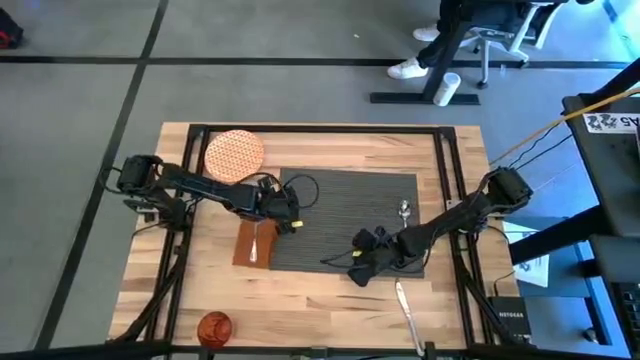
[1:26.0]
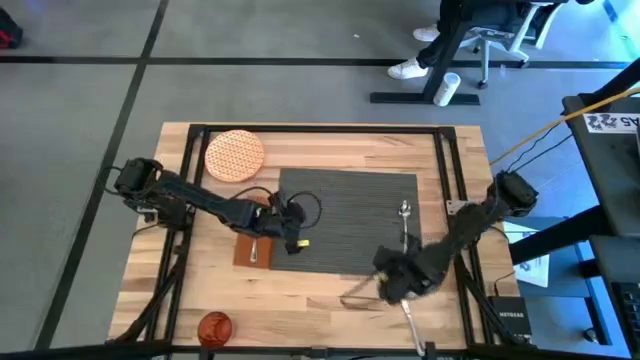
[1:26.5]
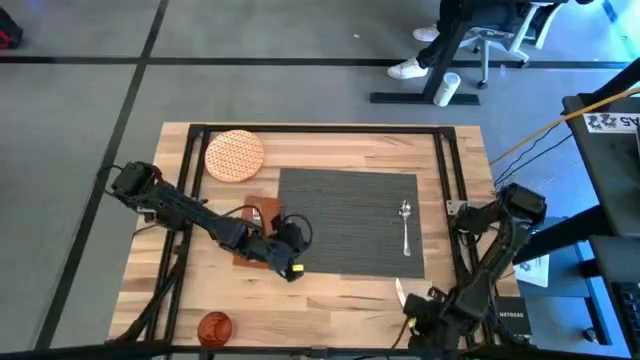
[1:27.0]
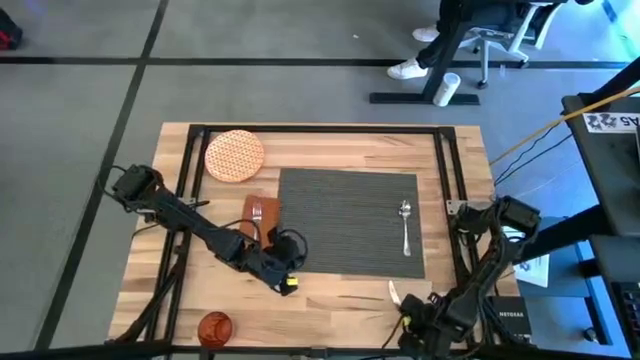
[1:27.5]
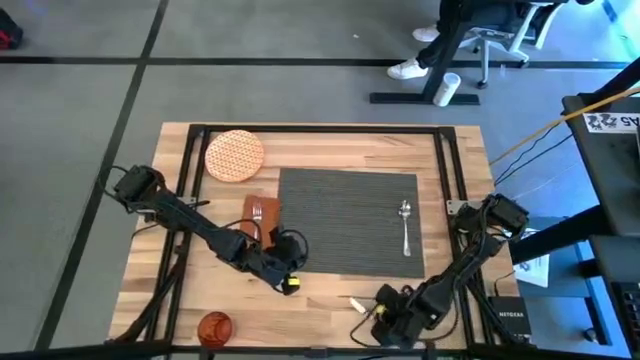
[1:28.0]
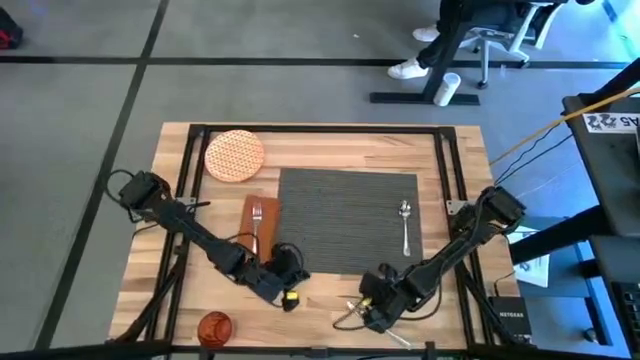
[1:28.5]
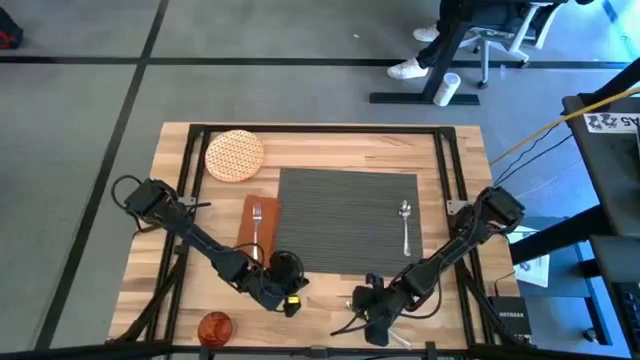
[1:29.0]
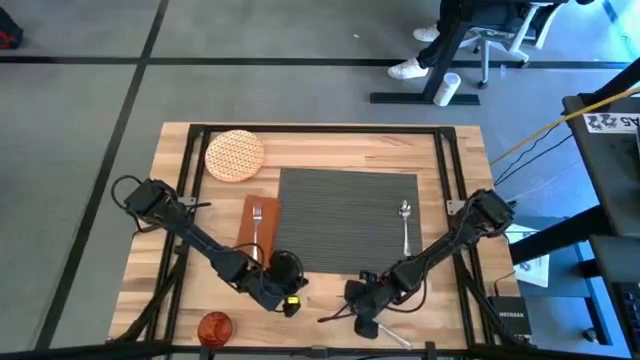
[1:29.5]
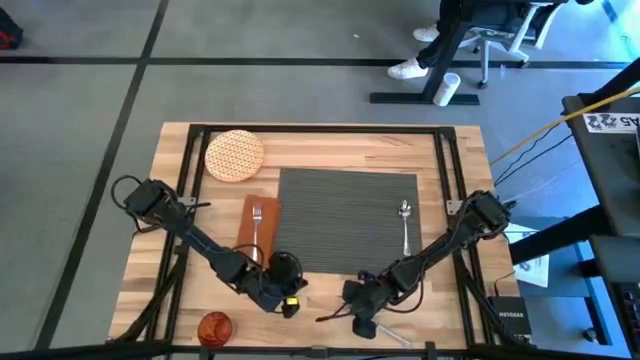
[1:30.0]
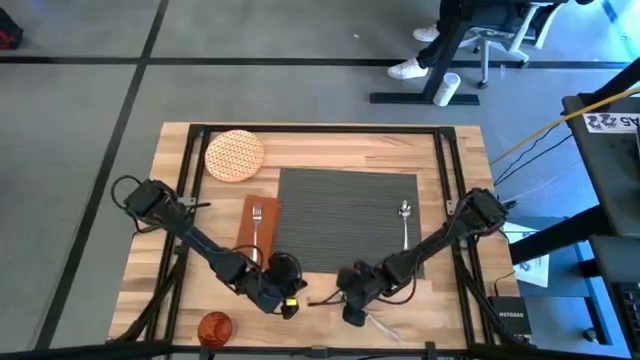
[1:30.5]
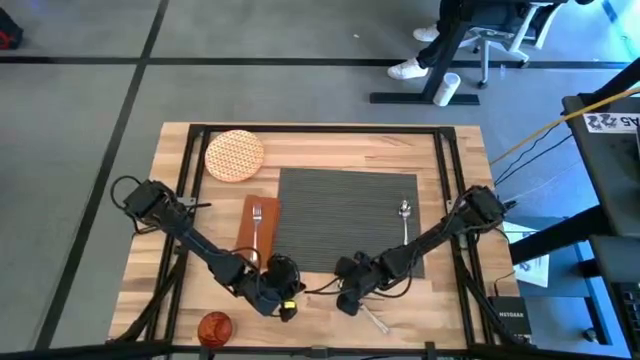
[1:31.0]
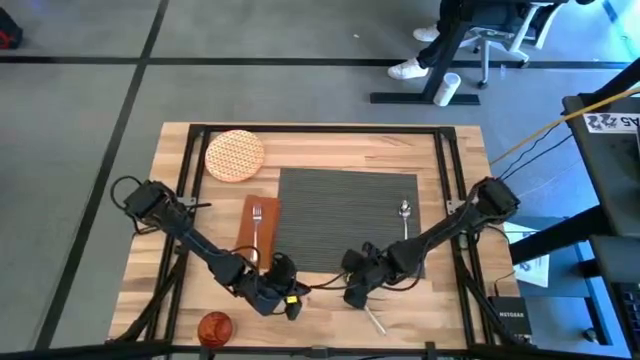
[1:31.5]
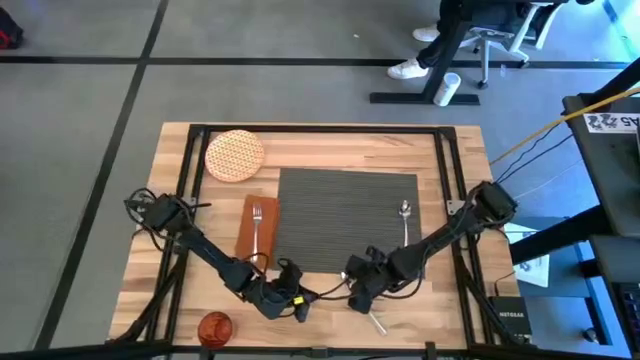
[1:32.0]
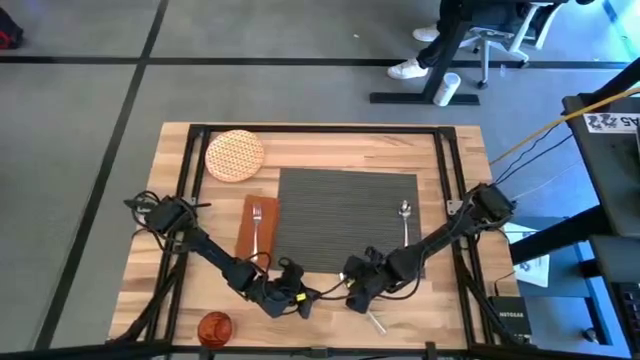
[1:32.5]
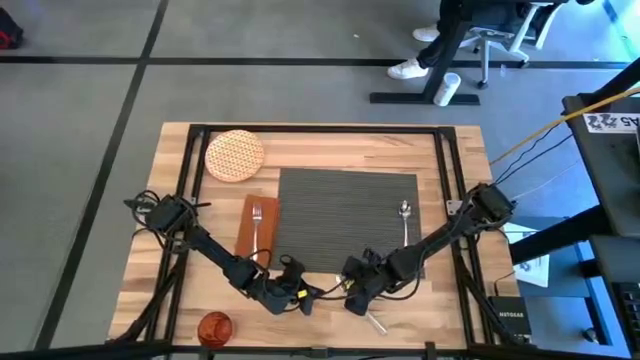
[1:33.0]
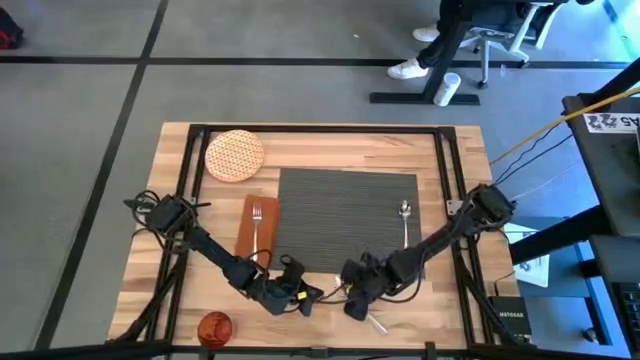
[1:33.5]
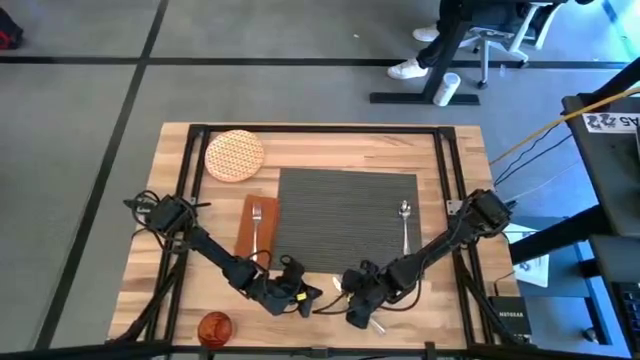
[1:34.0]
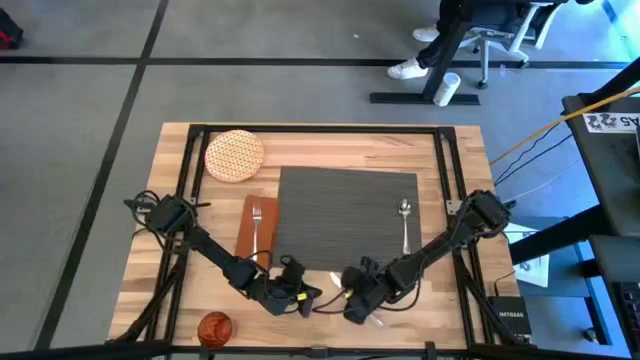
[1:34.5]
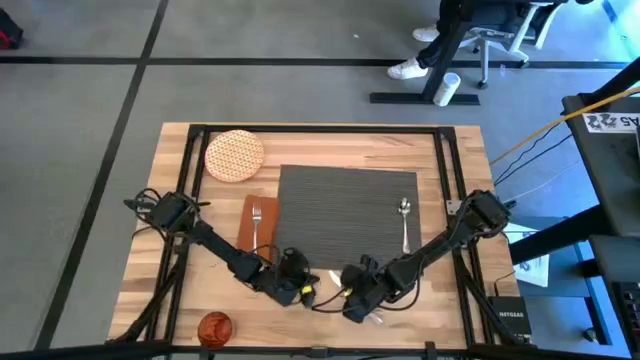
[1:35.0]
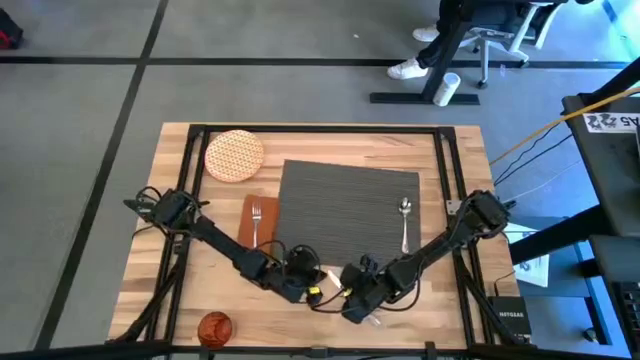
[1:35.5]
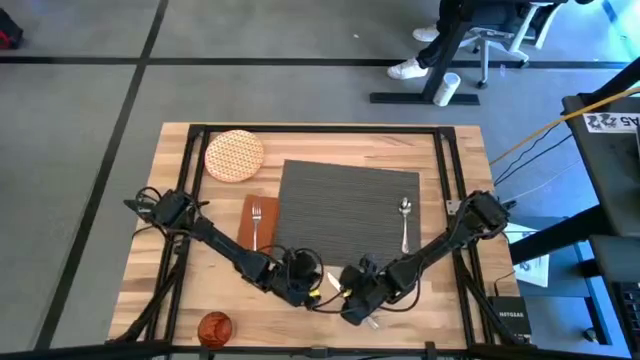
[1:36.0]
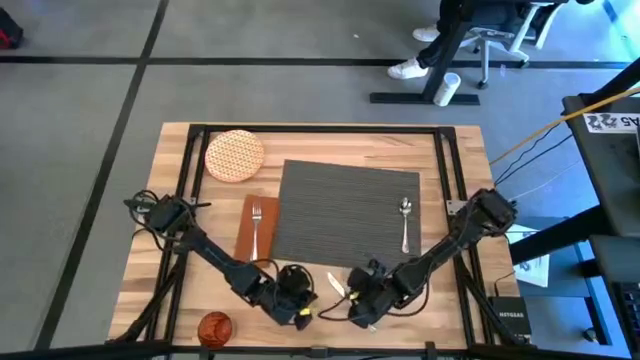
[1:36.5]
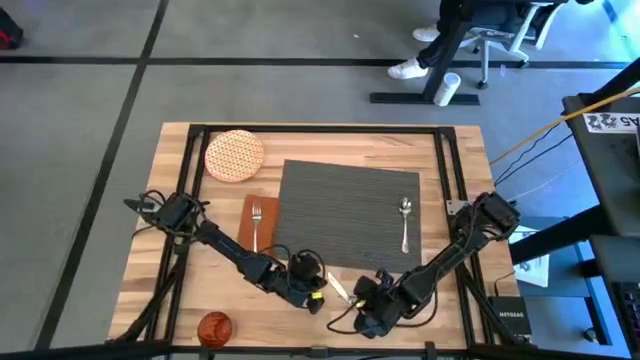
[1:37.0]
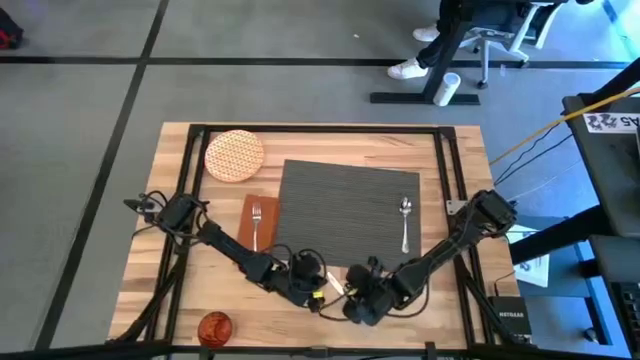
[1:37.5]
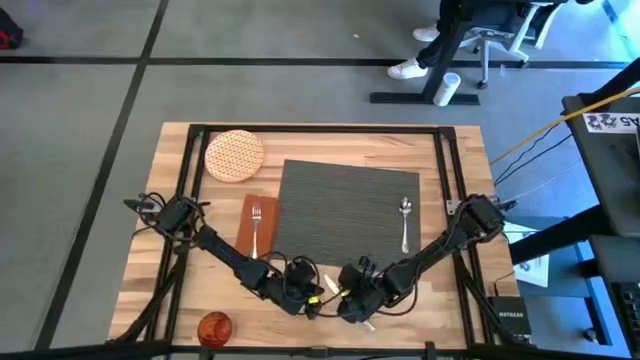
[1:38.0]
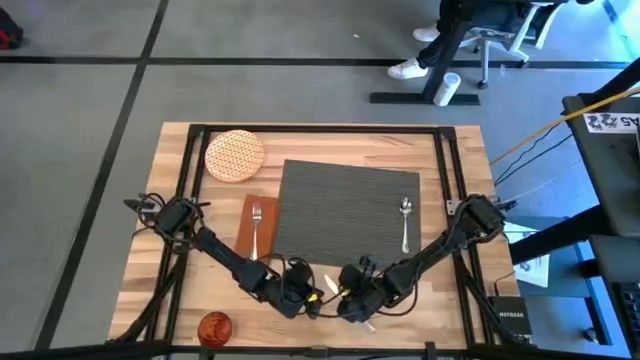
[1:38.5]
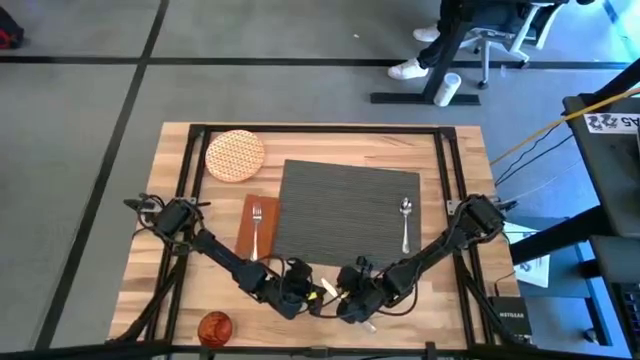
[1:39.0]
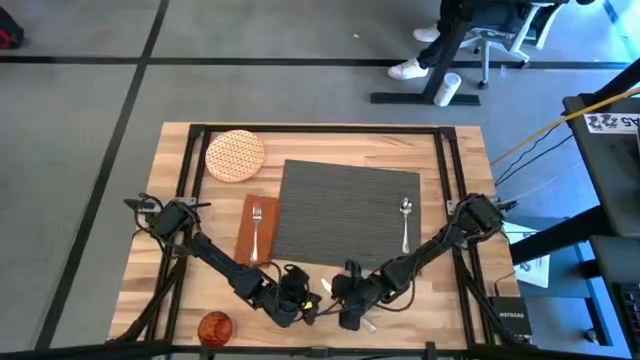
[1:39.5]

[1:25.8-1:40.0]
Task: Set table place
Put the silver table knife on the gray tablemat to the left of the silver spoon

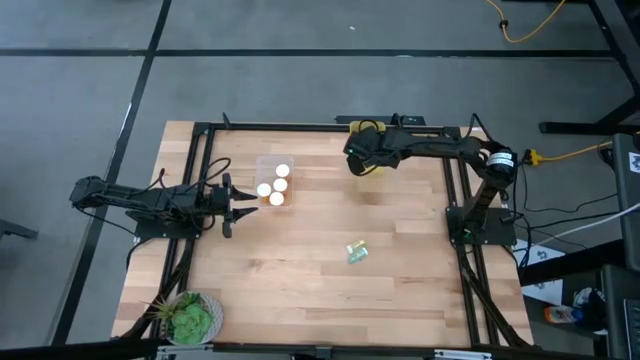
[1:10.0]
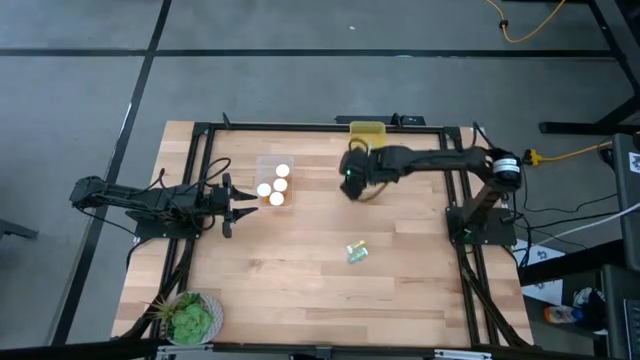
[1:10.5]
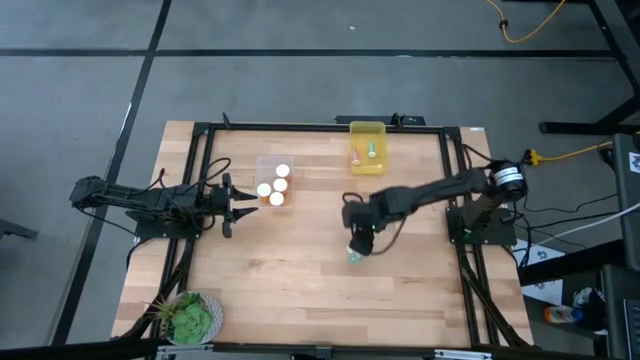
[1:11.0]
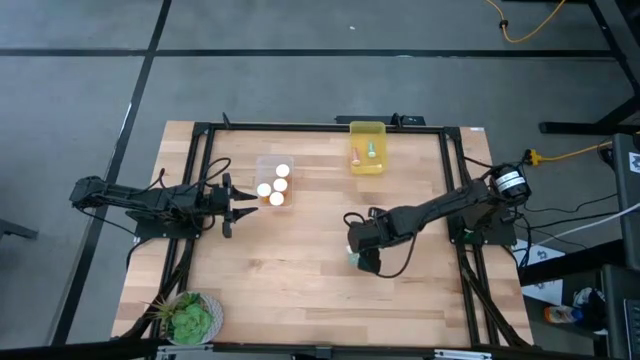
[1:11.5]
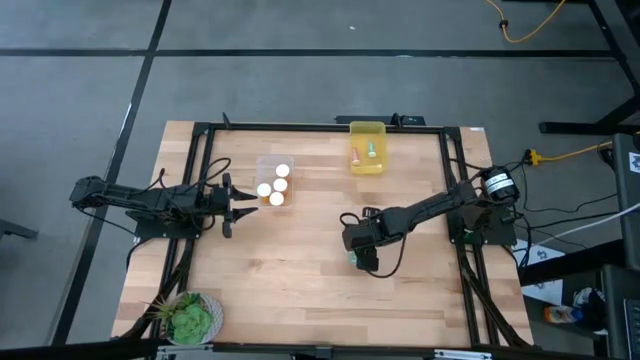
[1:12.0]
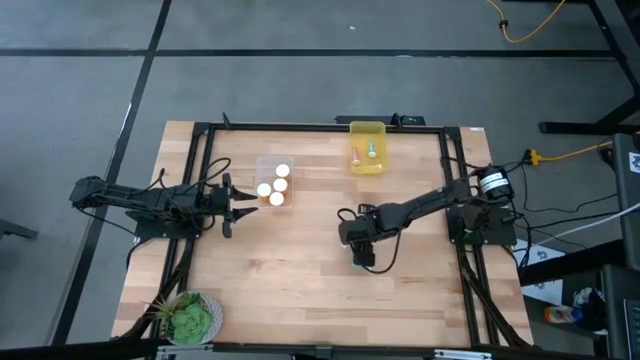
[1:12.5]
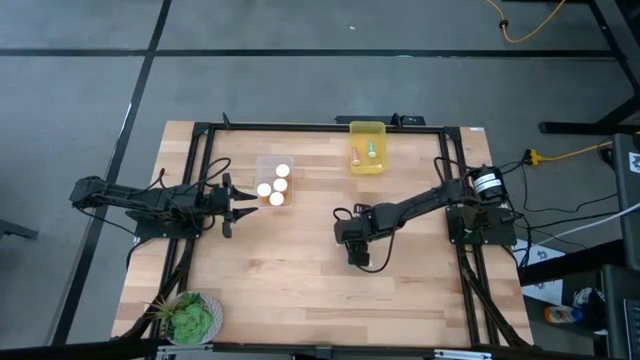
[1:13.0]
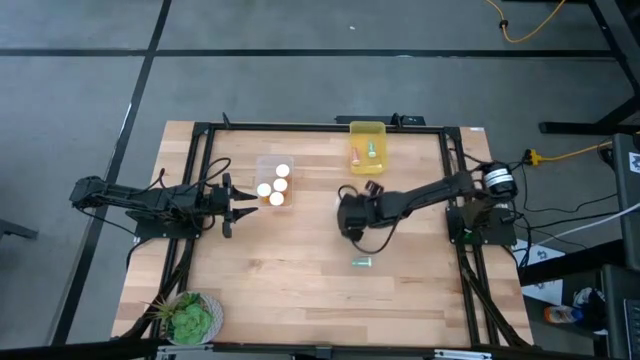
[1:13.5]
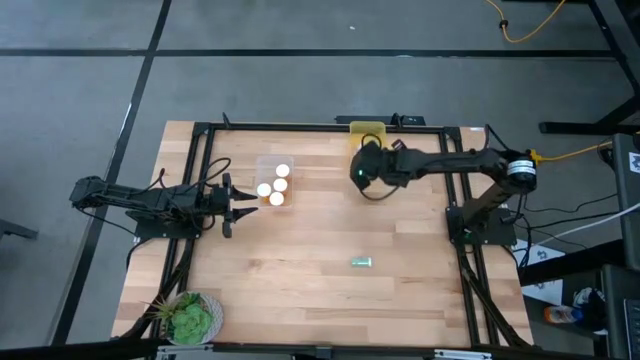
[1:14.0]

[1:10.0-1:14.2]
Task: Pick and place medicine bottles into bin by pill shape (circle, oval)
Put the small yellow bottle into the yellow bin

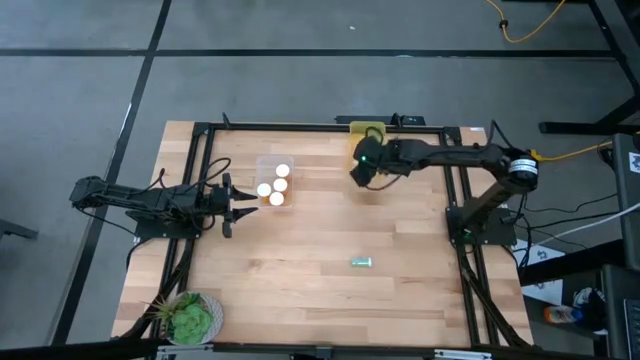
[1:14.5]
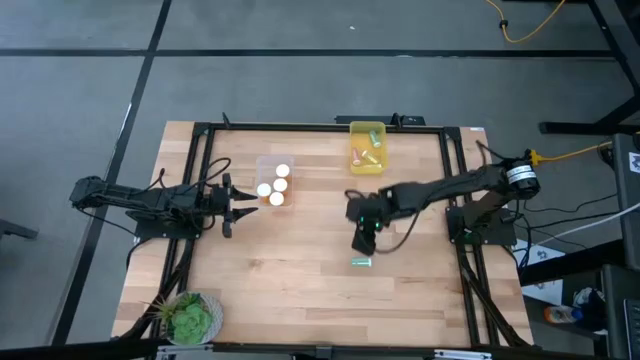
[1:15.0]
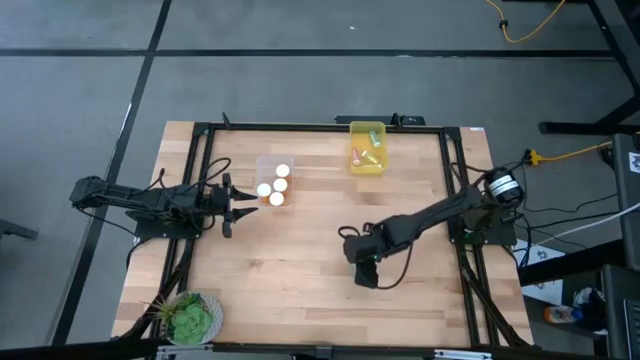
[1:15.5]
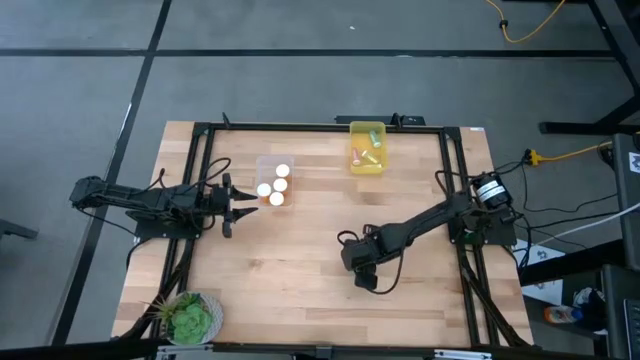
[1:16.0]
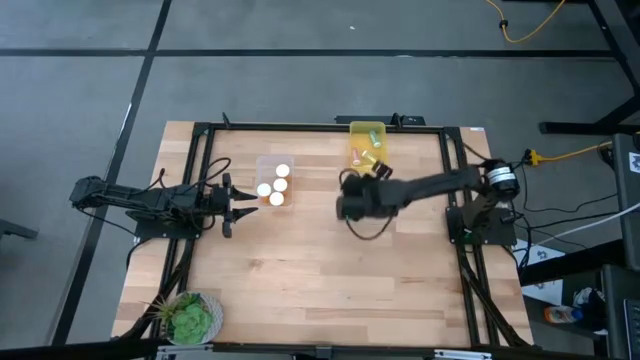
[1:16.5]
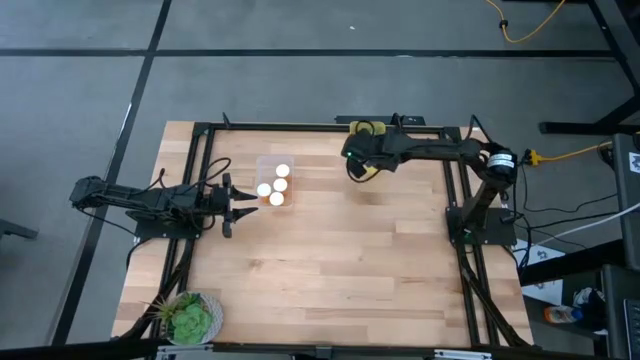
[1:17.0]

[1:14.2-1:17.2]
Put the small green pill bottle into the yellow bin
